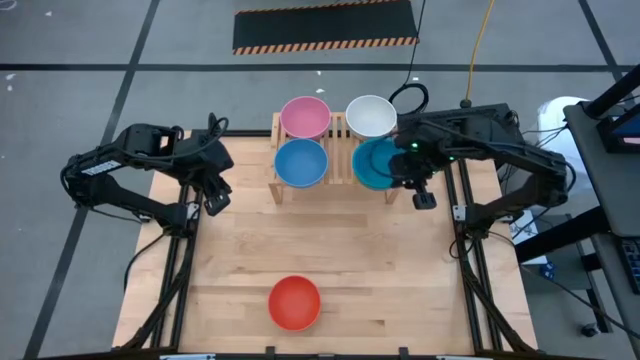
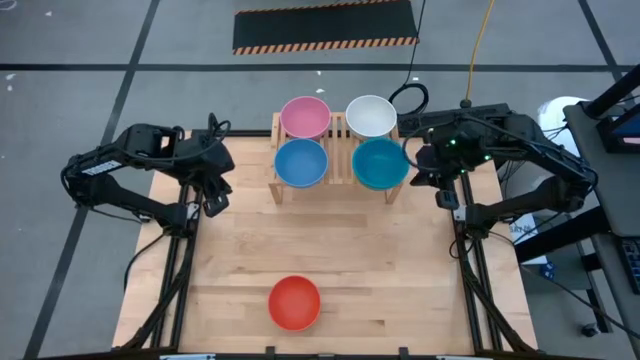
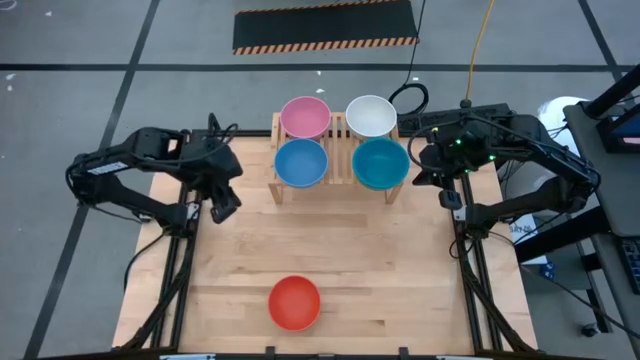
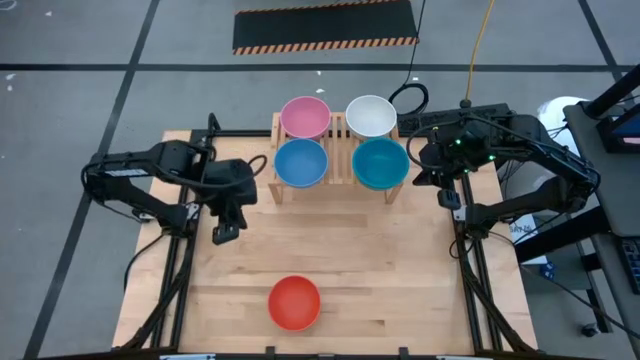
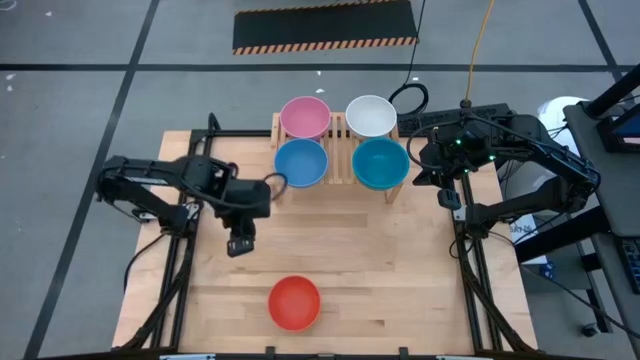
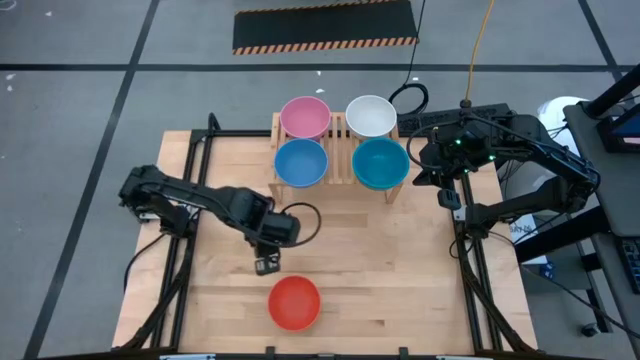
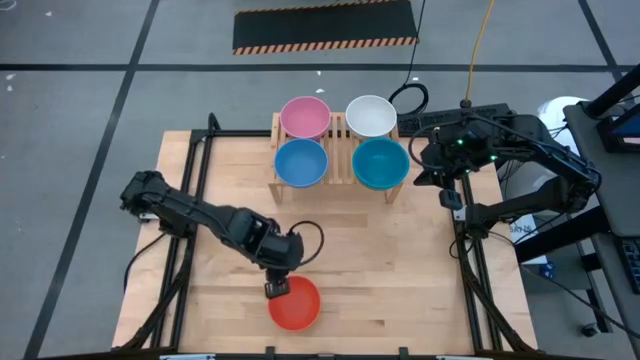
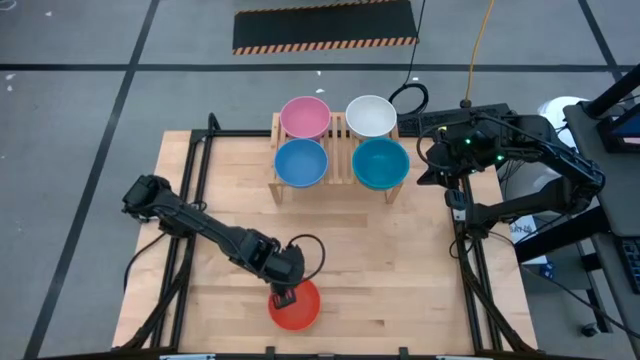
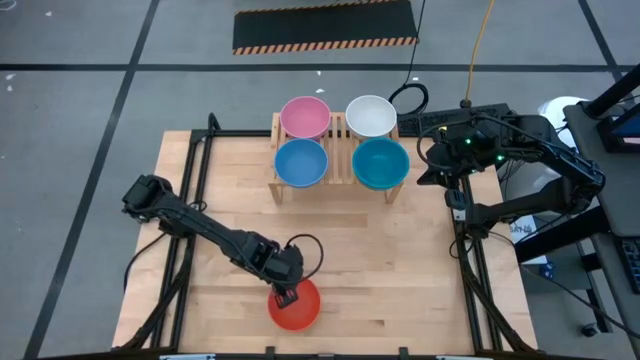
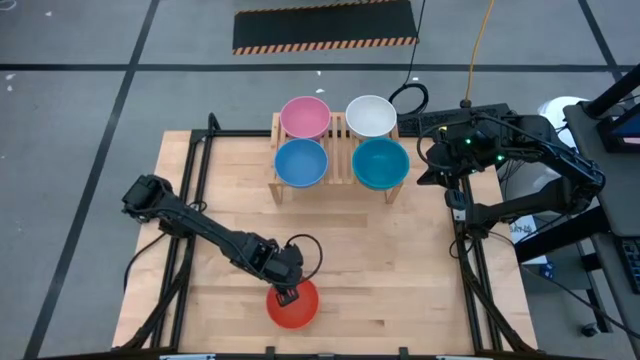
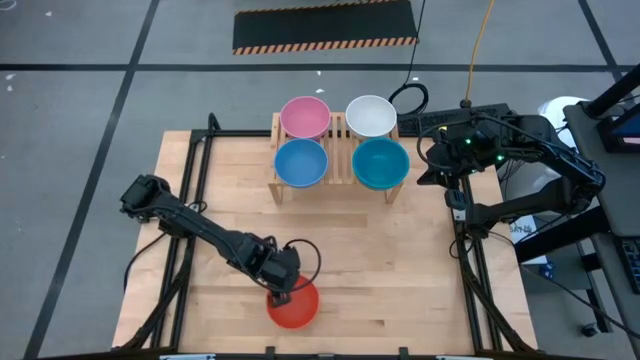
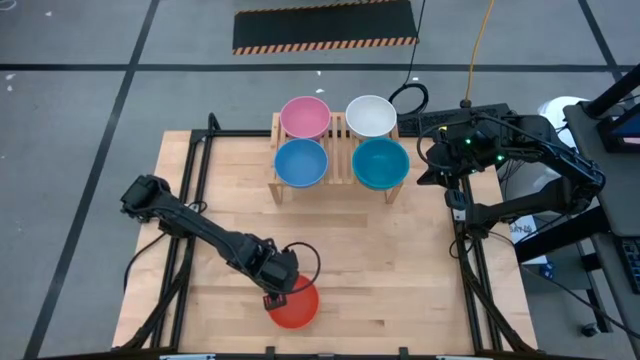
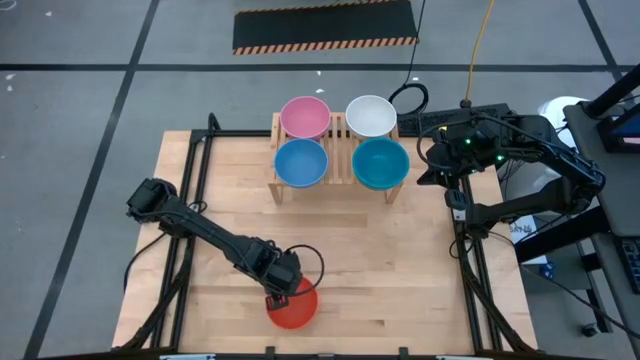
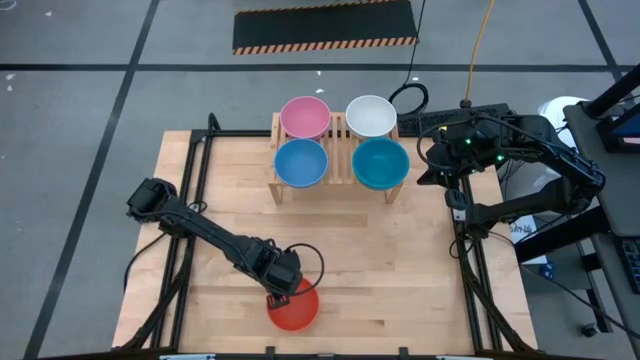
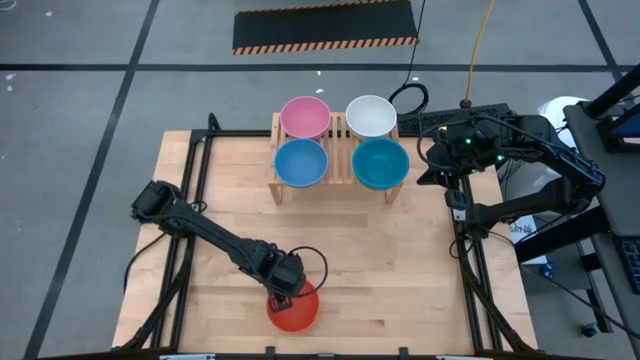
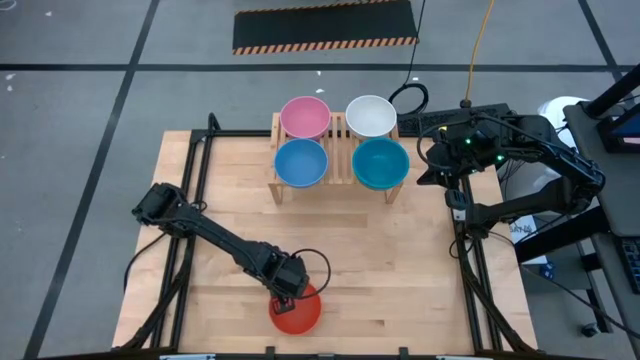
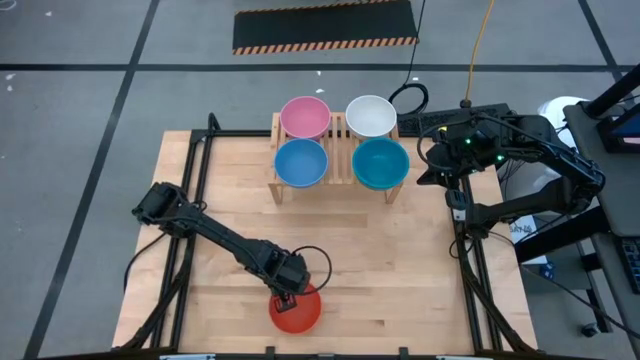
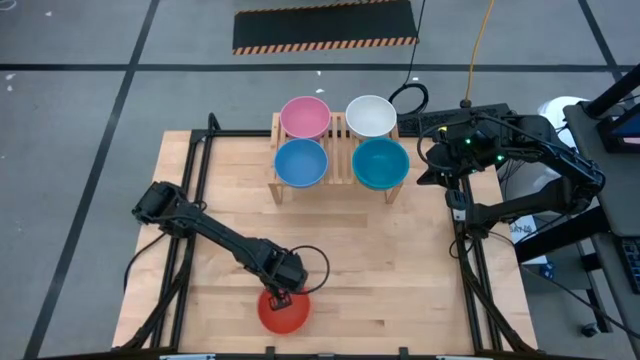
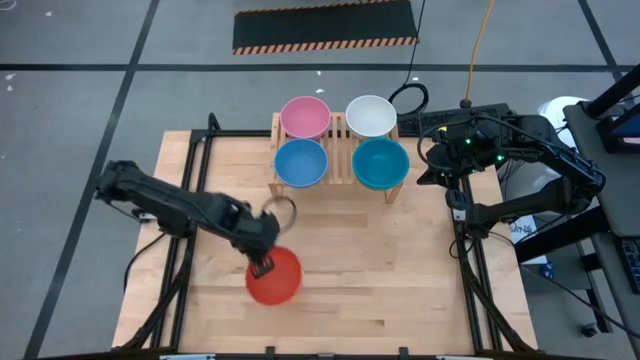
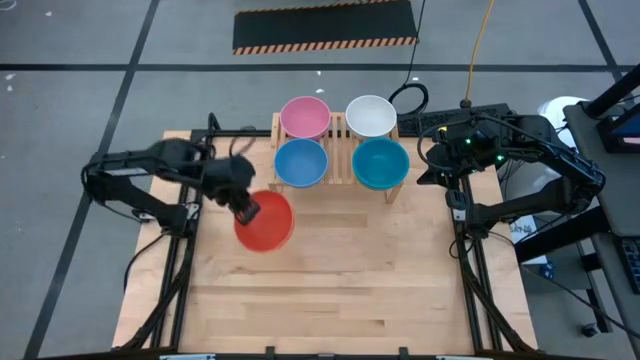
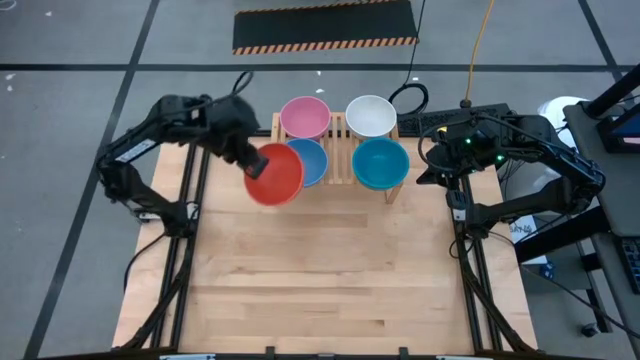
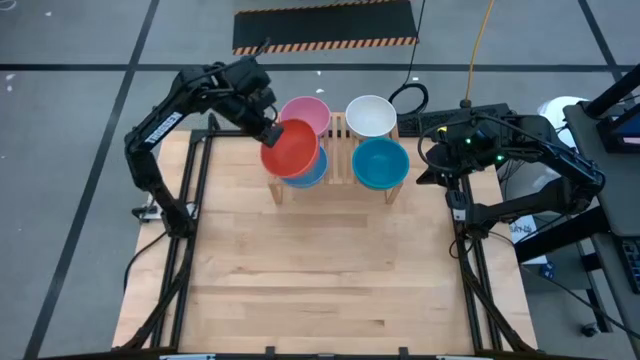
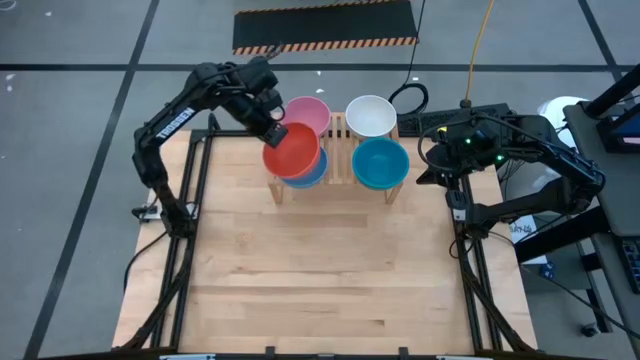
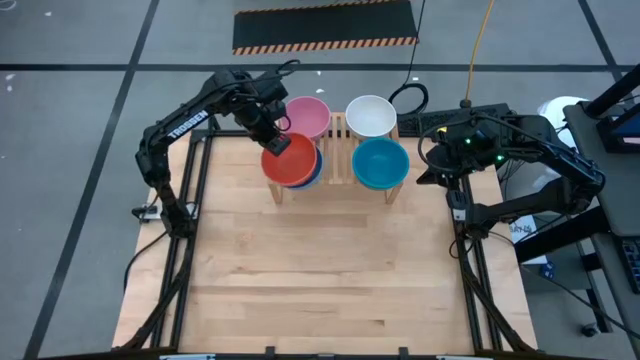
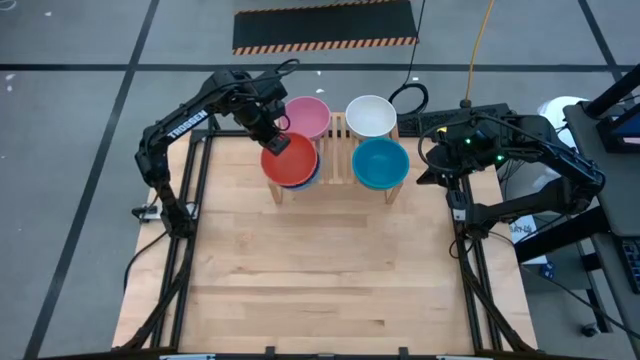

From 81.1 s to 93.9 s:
Task: Place and stack bowls onto a shelf
Stack the orange bowl on top of the left blue bowl on the shelf

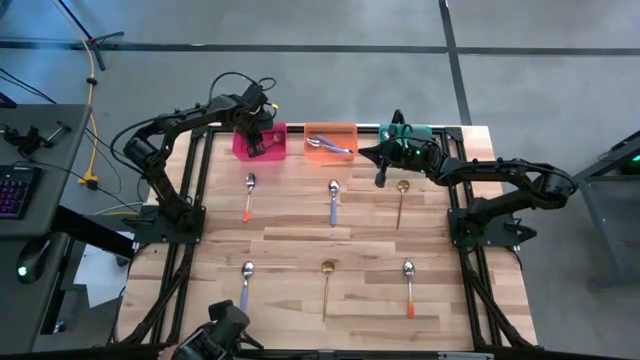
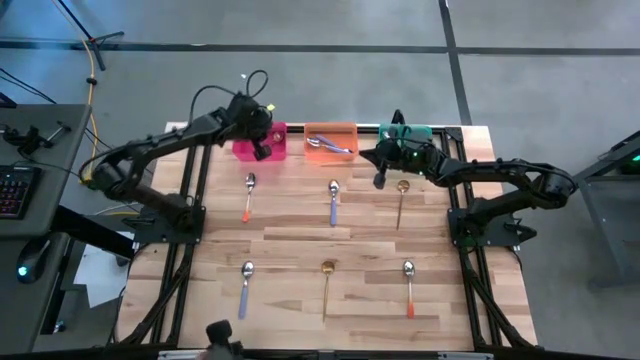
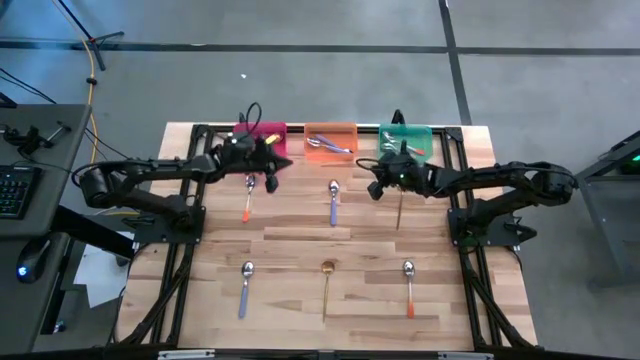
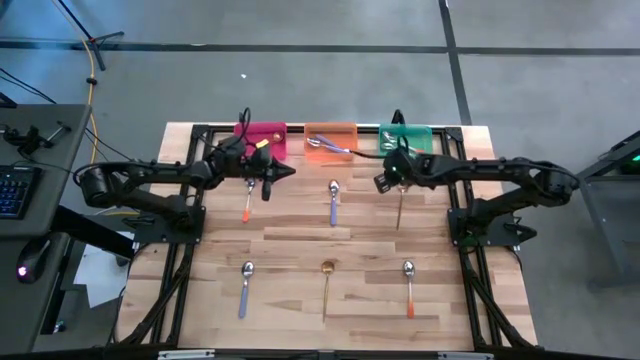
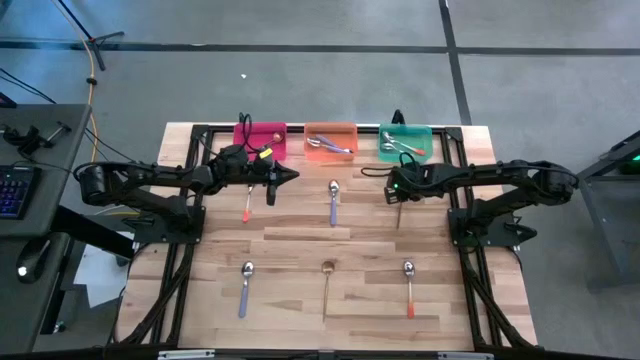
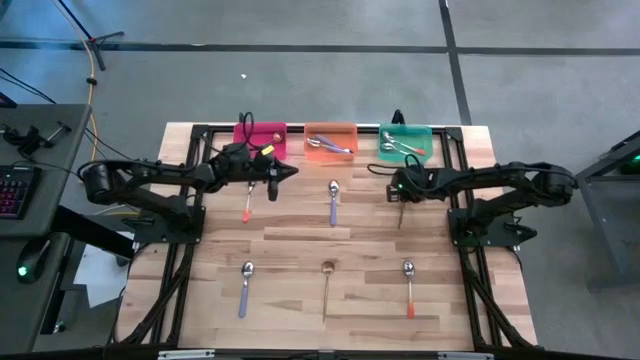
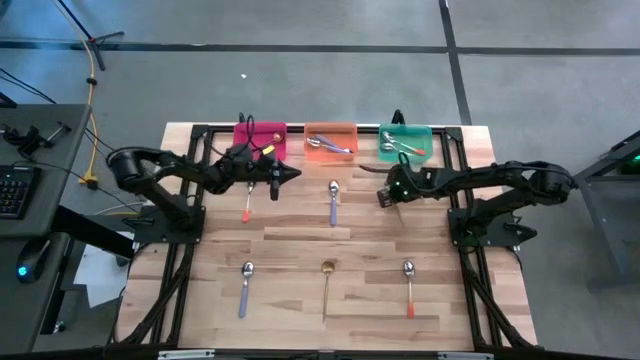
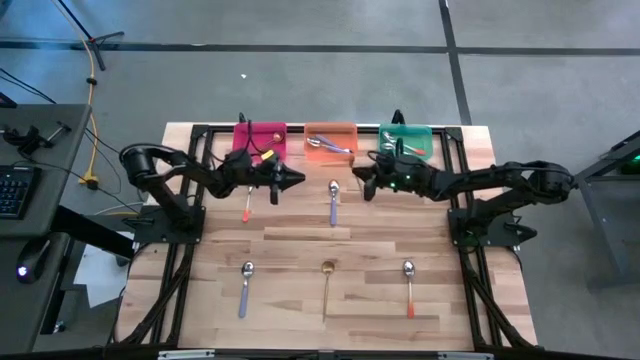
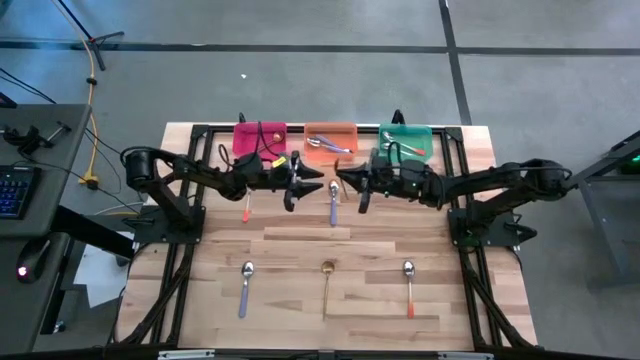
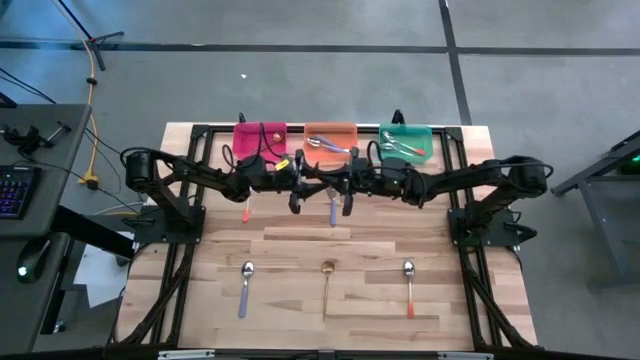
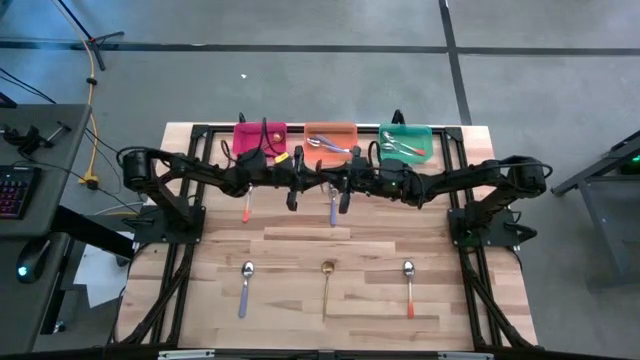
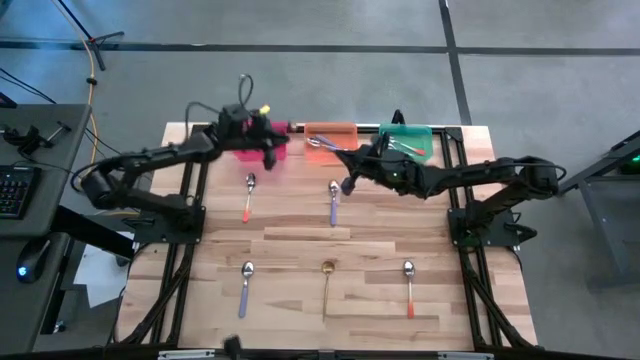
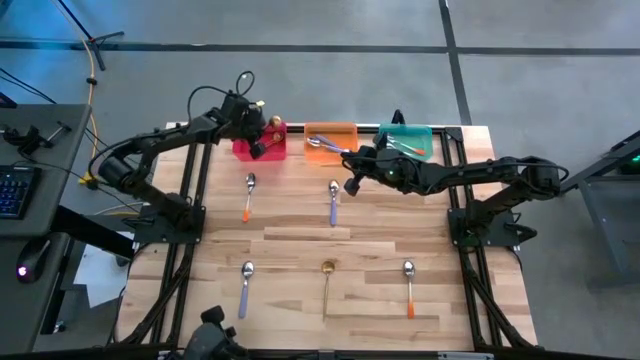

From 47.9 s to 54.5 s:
Task: Sort silverware by color (type)
Put the top gold spoon into the pink bin

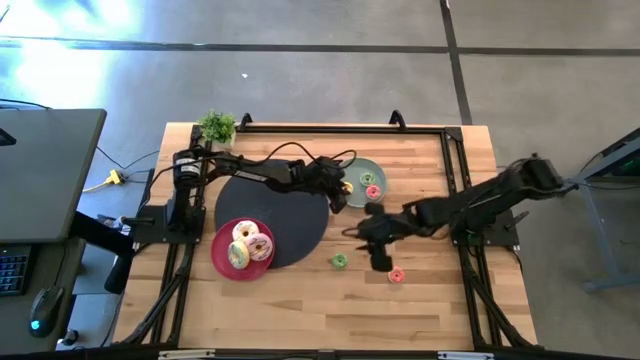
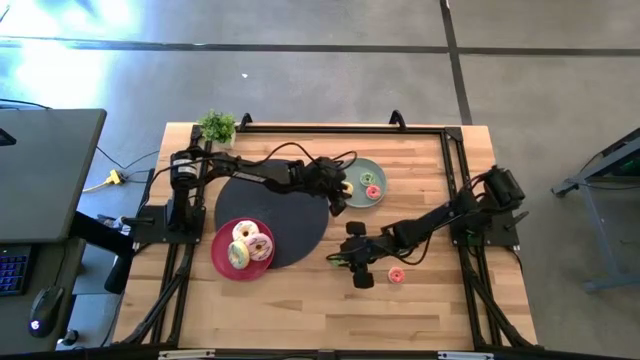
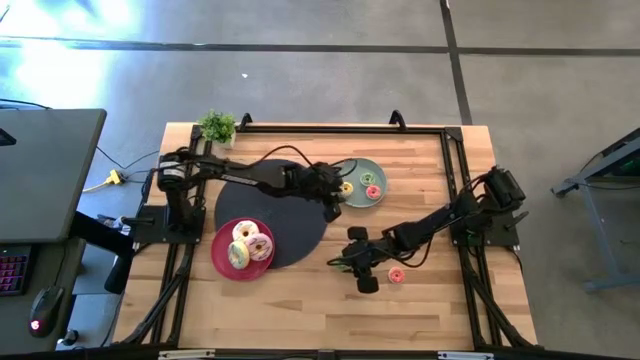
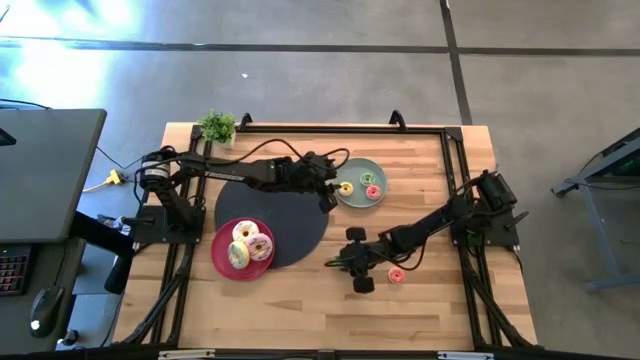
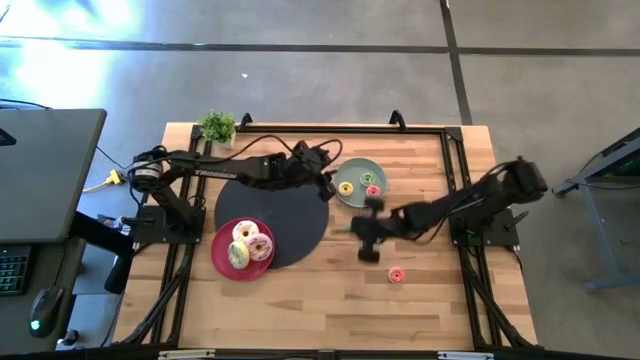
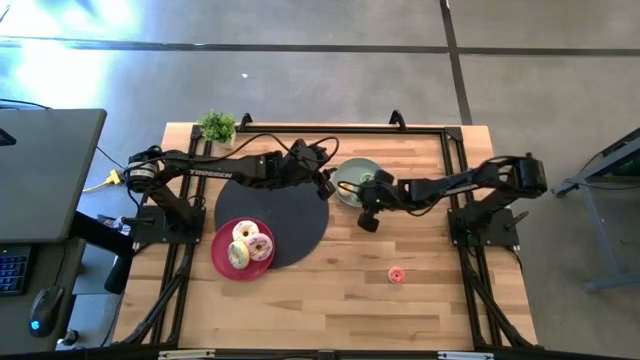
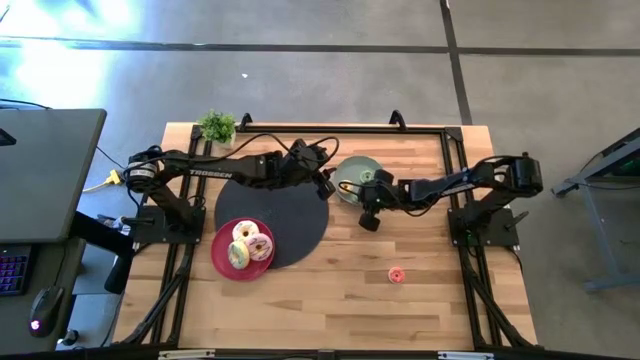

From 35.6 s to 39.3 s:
Task: Pick & Place donuts
Put the small green donut on the gray plate
